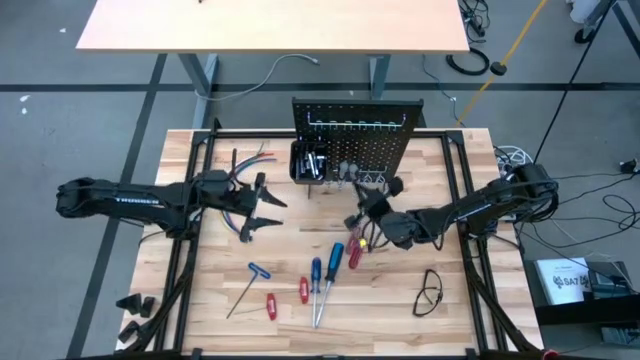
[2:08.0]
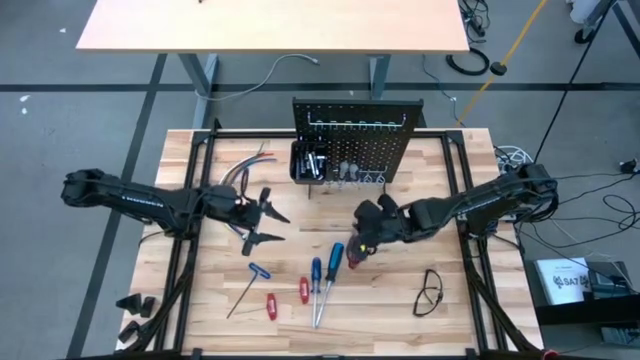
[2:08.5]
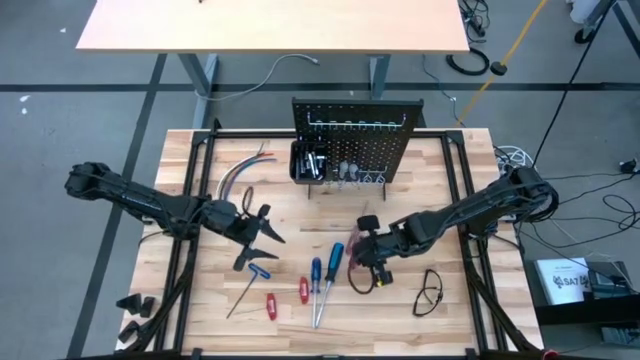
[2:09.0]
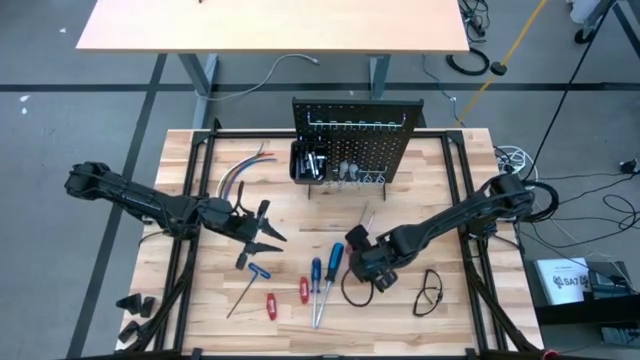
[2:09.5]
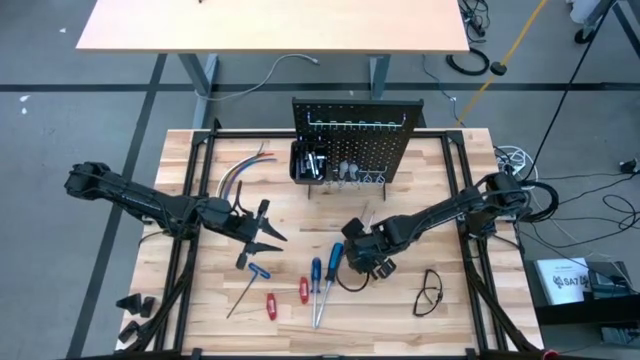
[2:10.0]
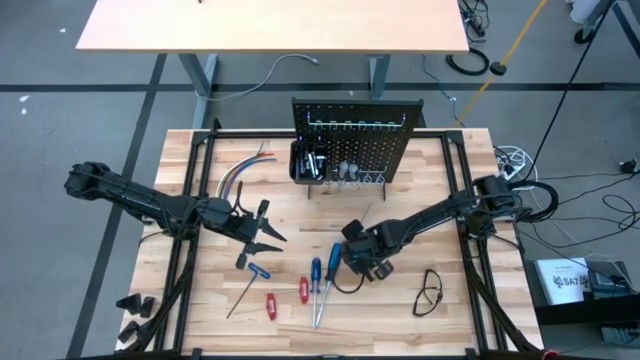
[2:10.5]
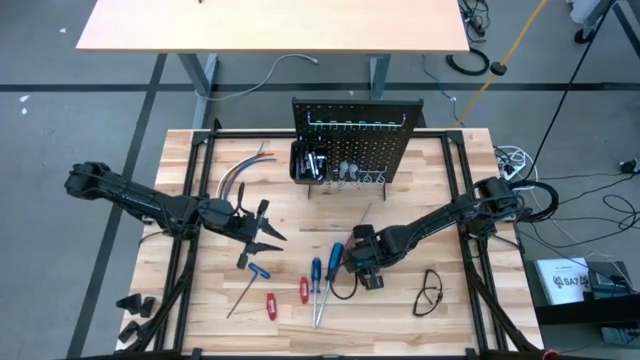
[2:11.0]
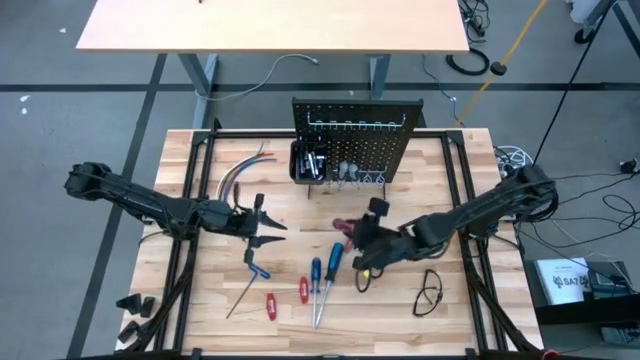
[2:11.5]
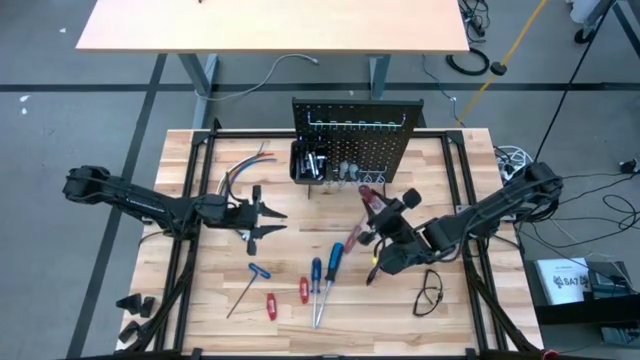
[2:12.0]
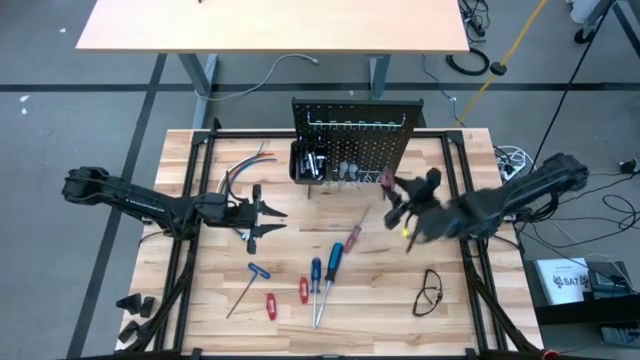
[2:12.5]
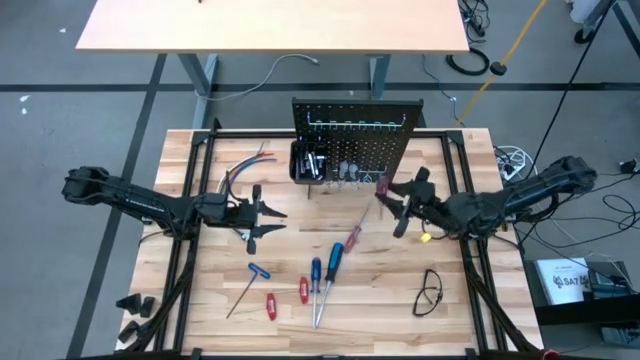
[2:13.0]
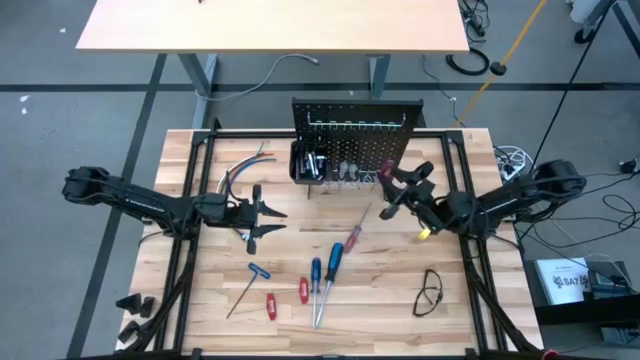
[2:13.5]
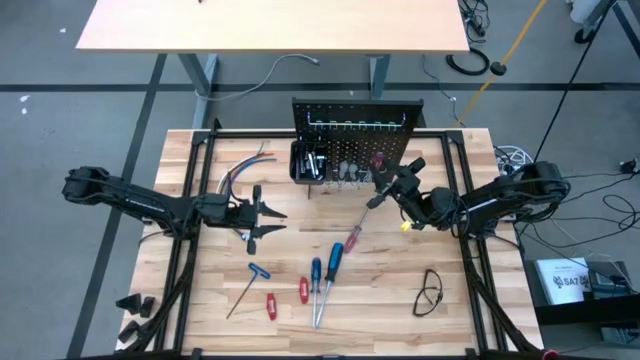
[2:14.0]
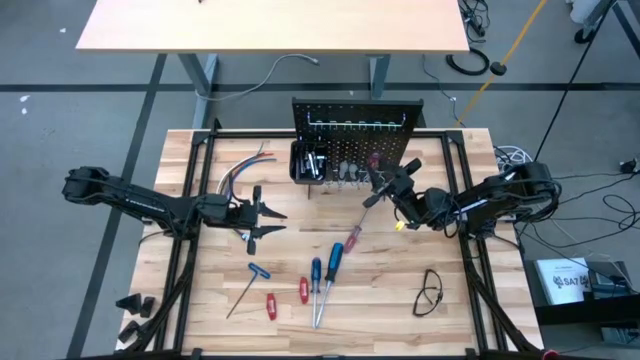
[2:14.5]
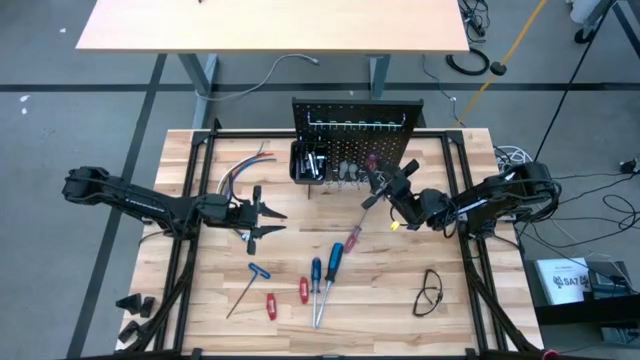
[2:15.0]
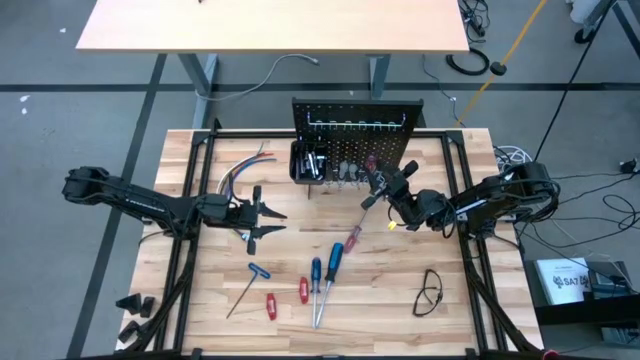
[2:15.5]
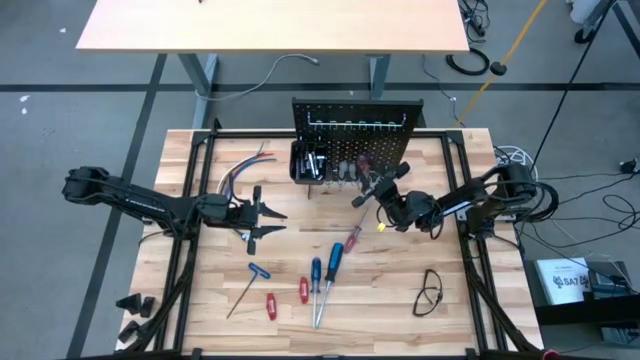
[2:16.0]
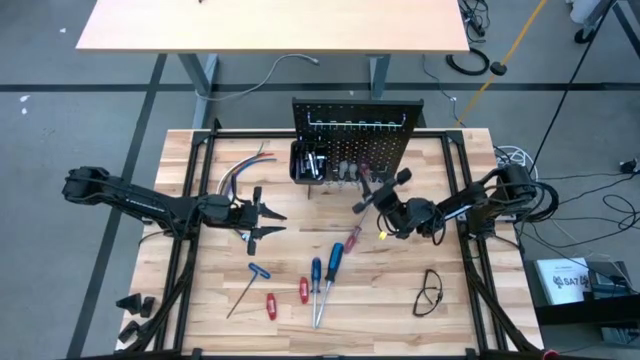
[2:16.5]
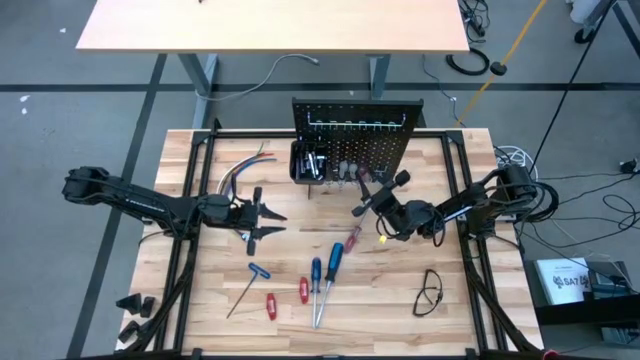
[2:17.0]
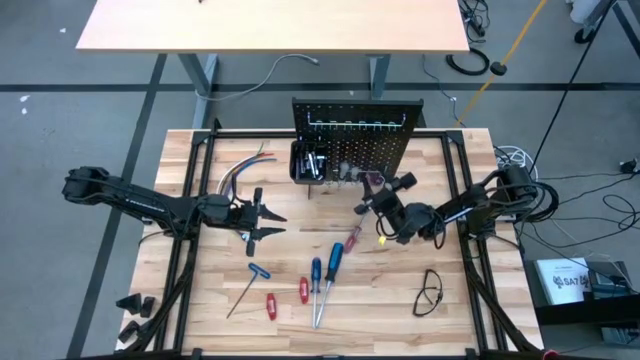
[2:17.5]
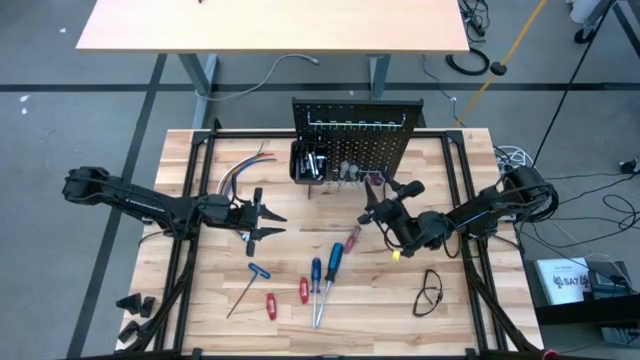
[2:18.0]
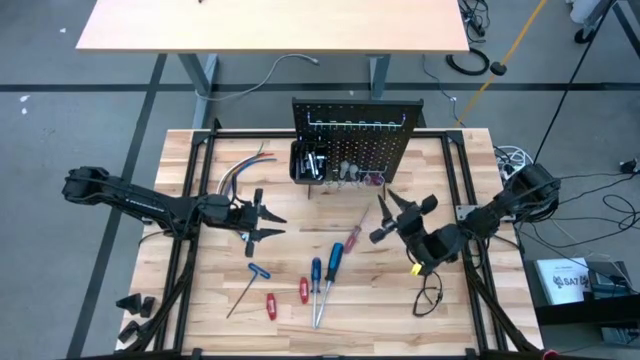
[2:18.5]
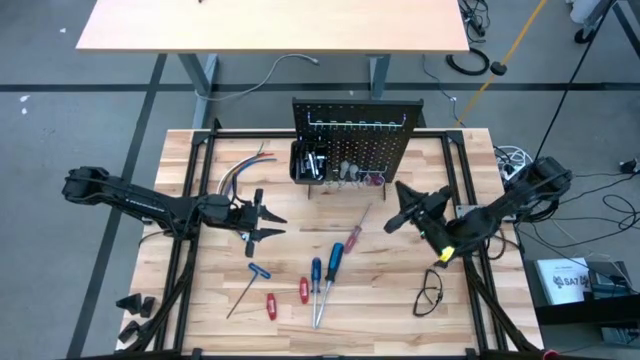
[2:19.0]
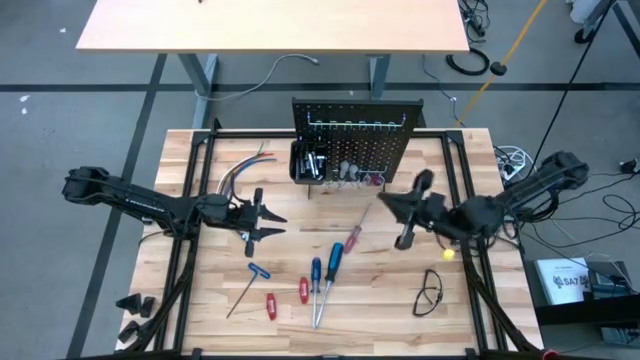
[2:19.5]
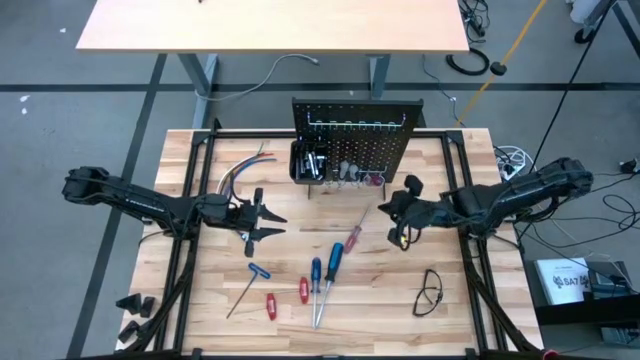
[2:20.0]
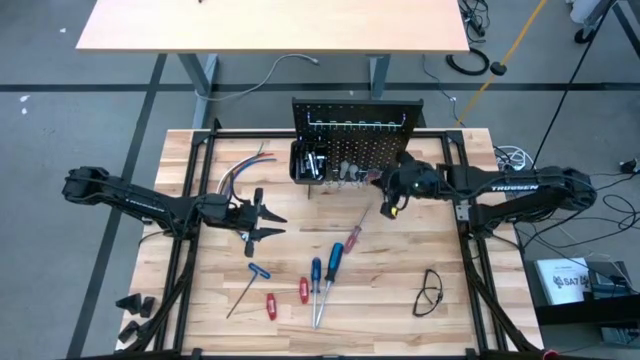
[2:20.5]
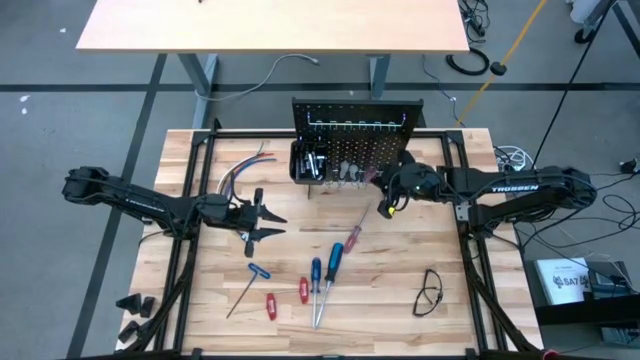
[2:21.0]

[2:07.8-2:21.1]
Task: Hang tools onto peg board
Hang the bottom red screwdriver on the peg board

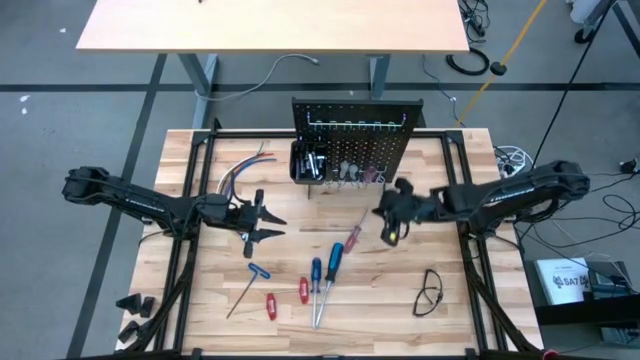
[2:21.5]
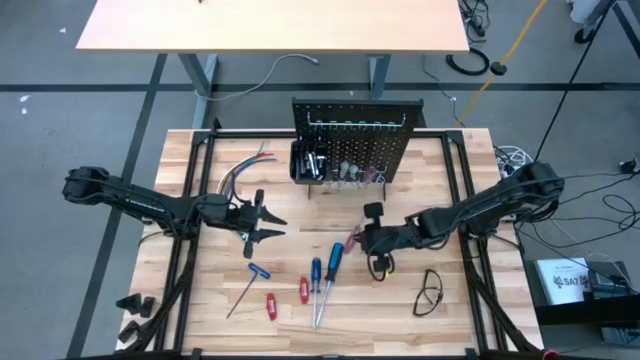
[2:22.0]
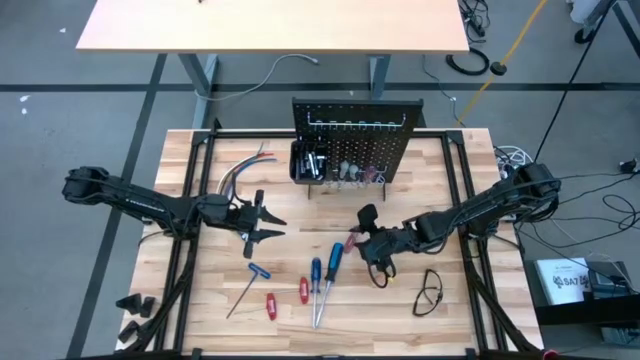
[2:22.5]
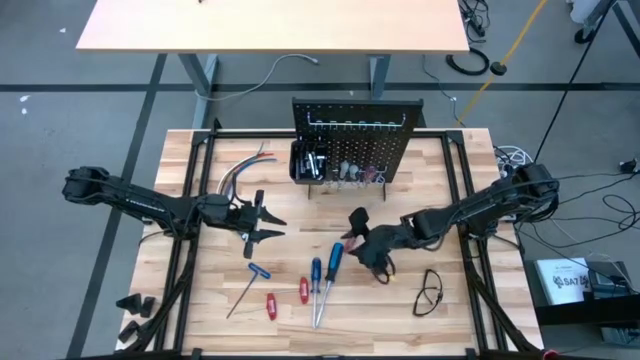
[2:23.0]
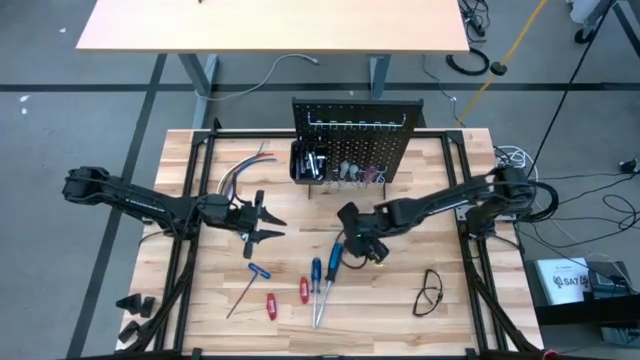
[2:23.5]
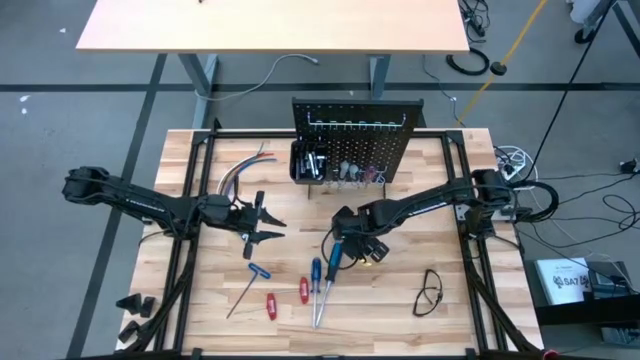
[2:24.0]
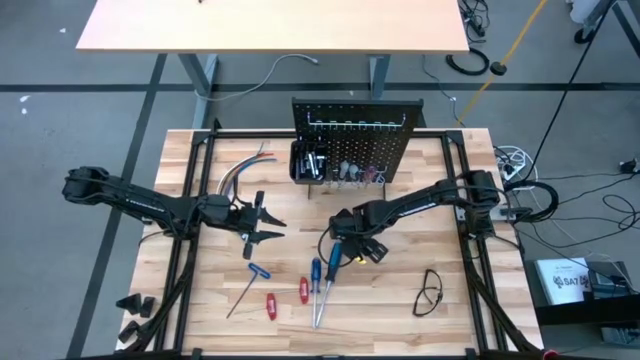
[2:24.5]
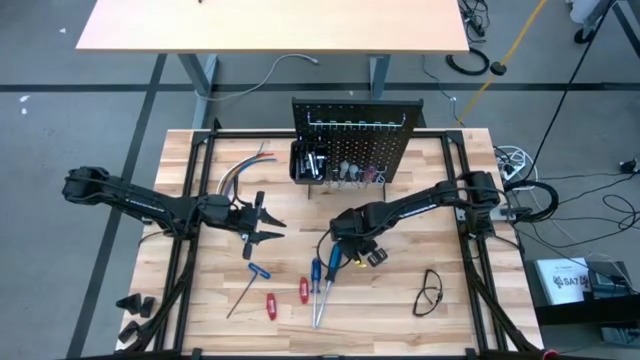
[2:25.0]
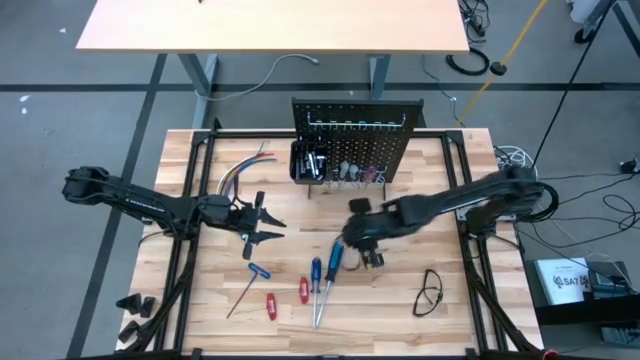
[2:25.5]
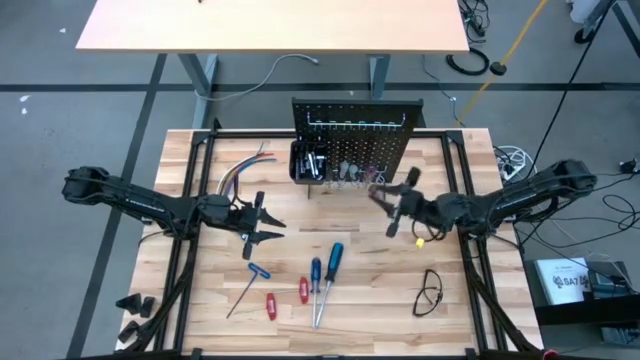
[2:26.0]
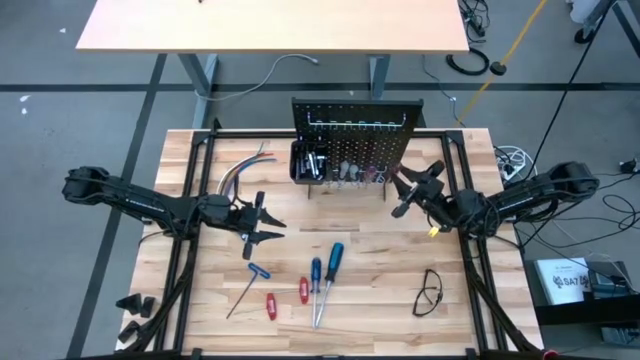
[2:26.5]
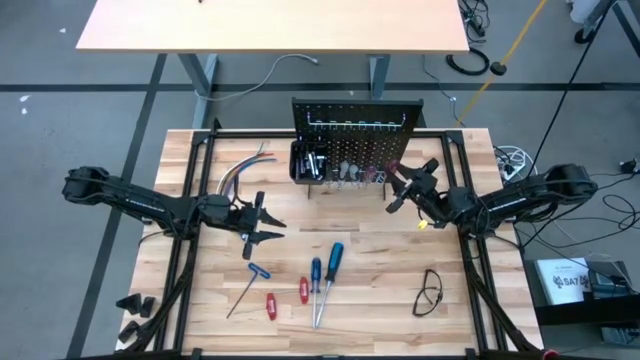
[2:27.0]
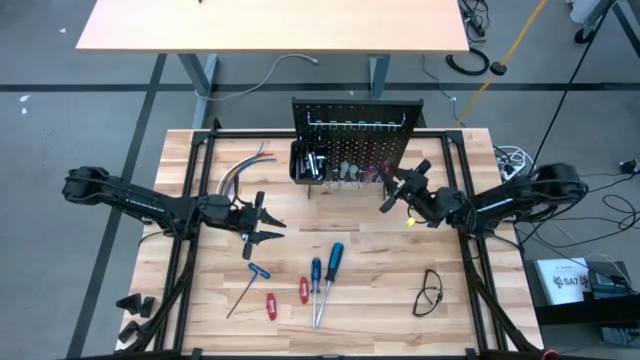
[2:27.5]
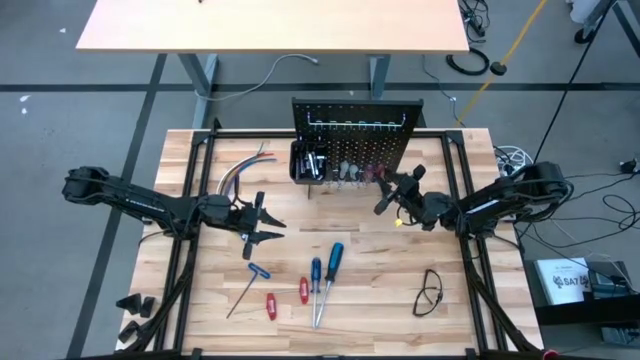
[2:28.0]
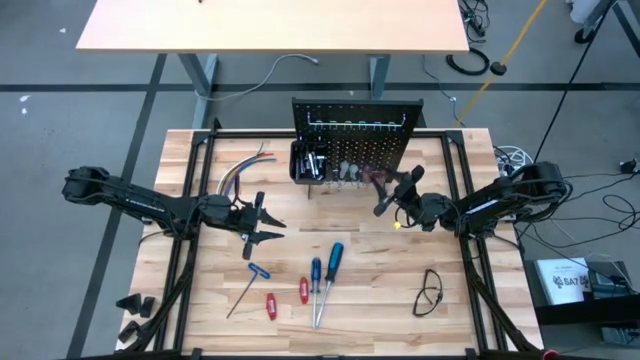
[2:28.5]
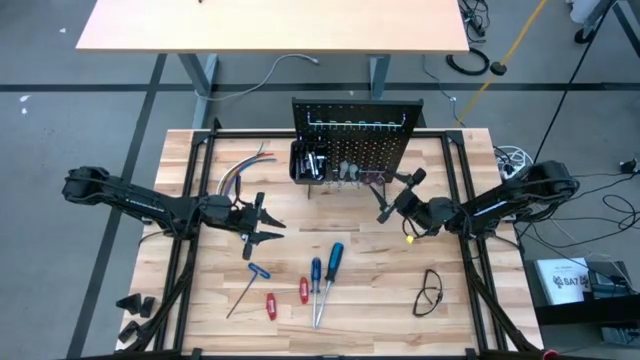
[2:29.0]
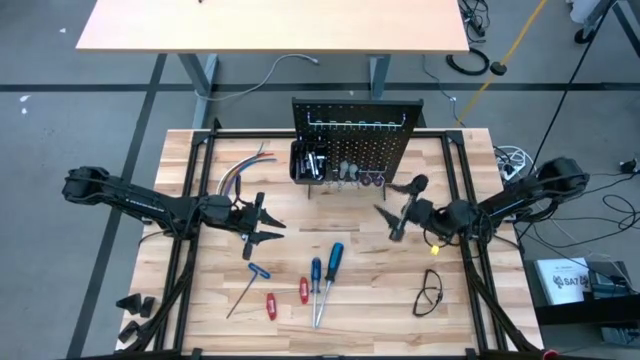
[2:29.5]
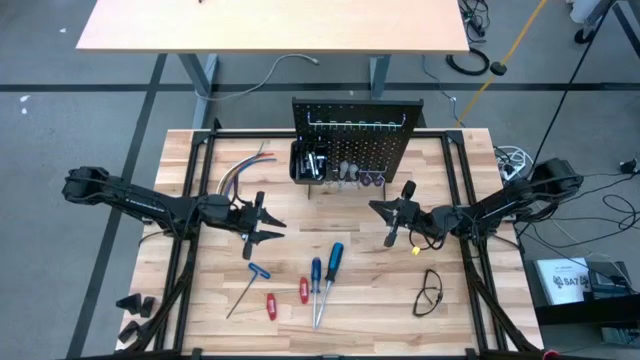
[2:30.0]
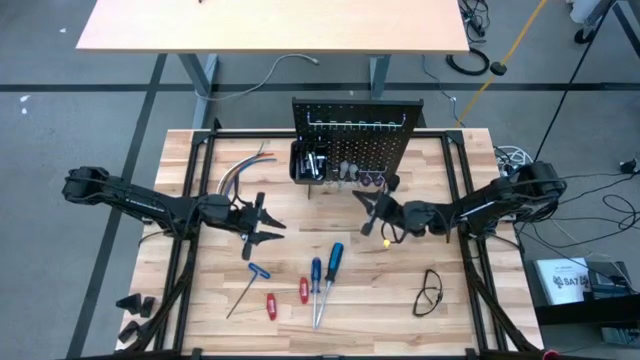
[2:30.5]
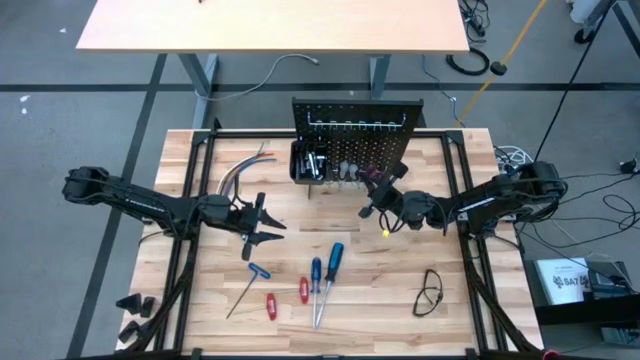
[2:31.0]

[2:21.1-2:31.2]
Hang the red screwdriver on the peg board
